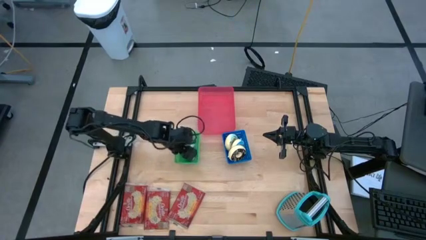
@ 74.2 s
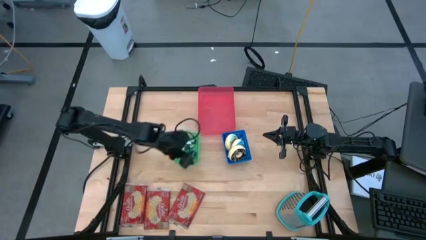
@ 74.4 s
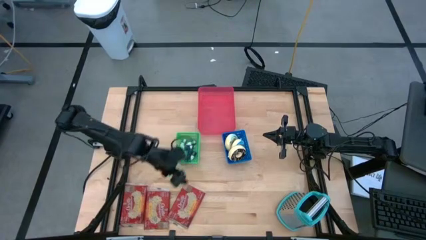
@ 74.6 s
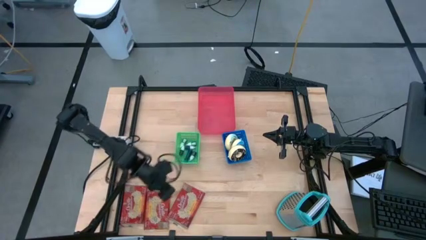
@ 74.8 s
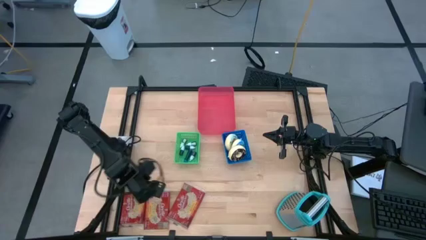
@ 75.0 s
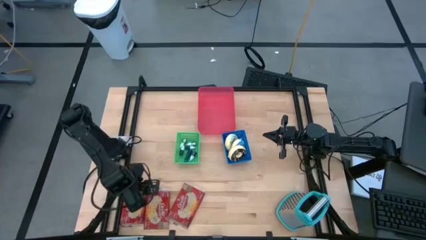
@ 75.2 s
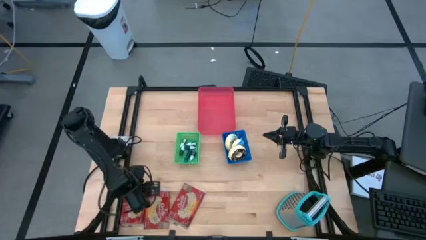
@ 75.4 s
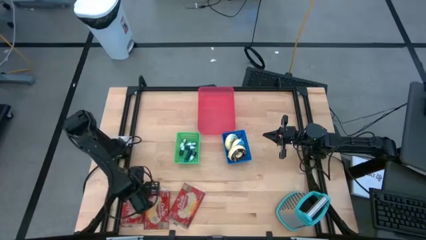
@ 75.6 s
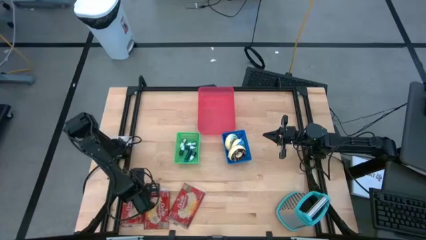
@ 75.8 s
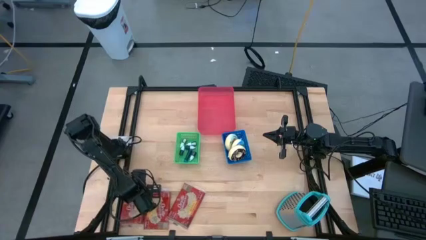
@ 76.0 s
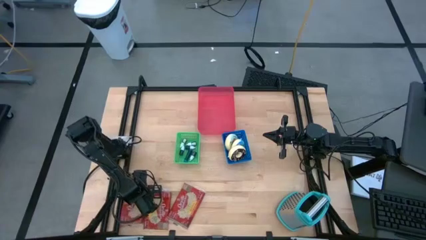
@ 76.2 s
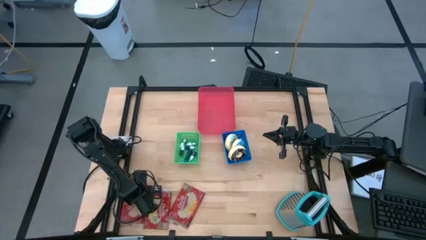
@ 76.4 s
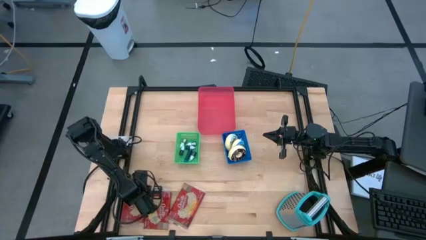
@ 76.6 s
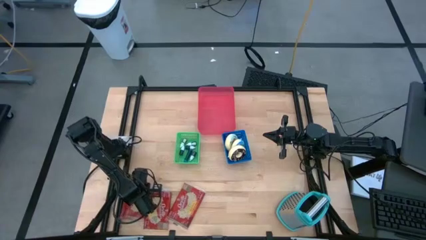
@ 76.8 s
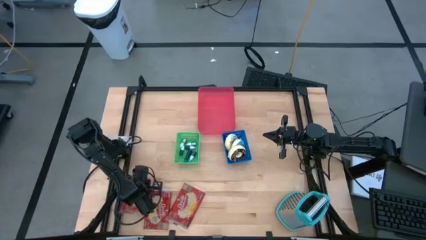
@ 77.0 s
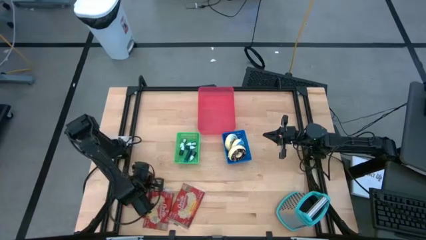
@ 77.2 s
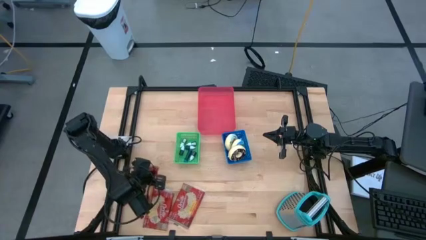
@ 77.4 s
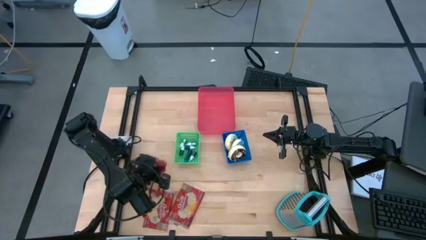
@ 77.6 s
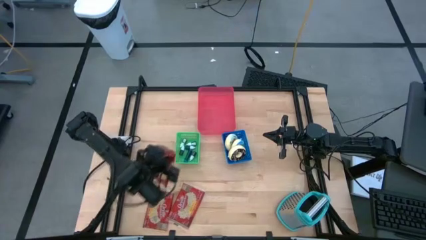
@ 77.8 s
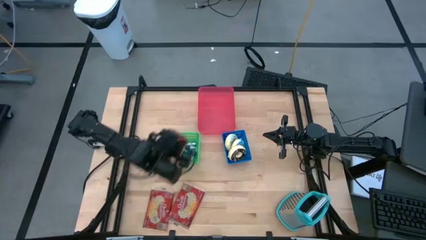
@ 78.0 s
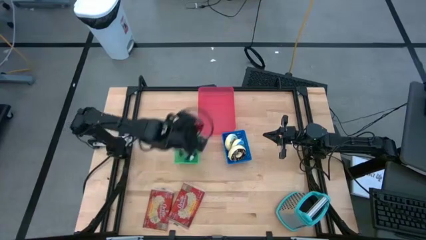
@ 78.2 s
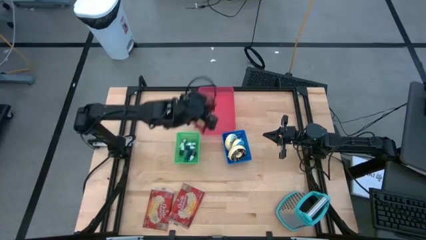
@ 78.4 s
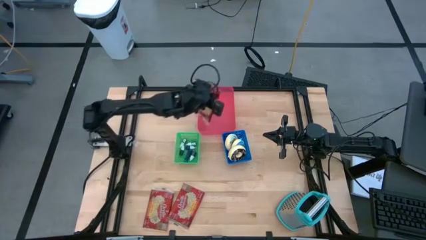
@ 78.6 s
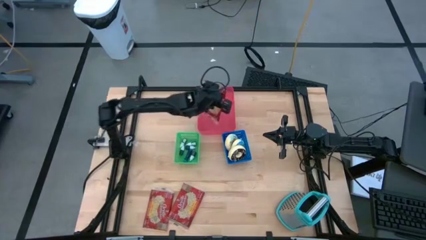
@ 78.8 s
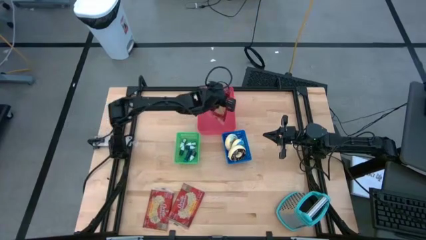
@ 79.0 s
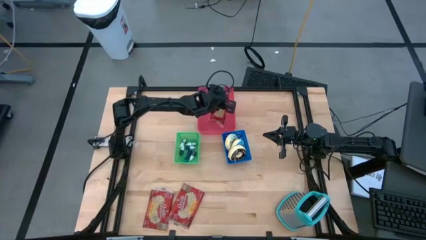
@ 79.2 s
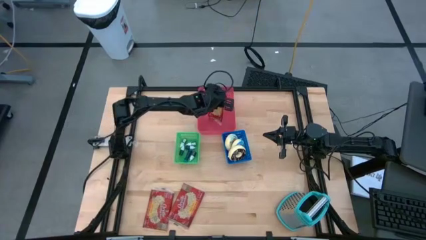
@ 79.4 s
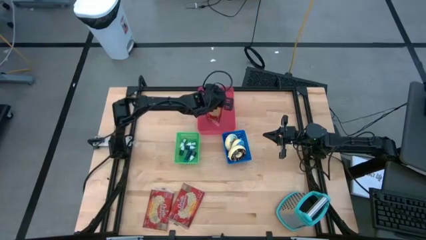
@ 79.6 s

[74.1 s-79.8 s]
Put the left red popcorn bag into the pink bin

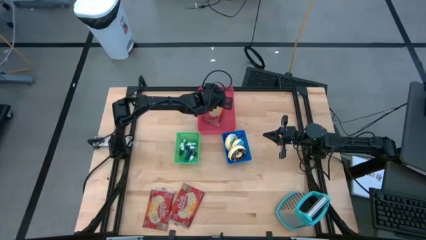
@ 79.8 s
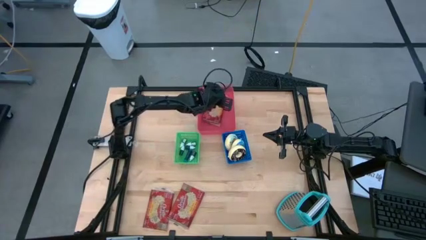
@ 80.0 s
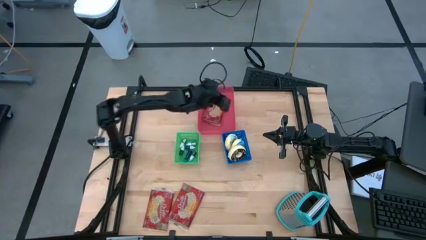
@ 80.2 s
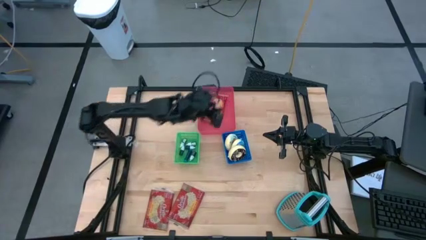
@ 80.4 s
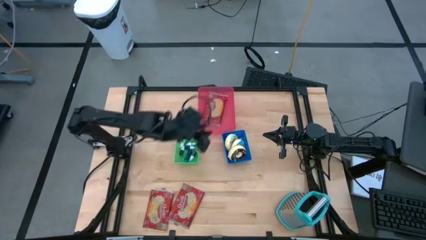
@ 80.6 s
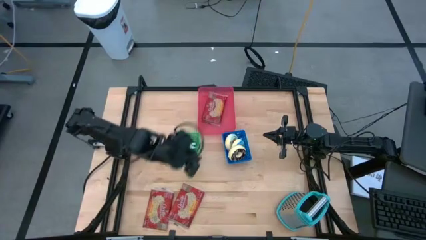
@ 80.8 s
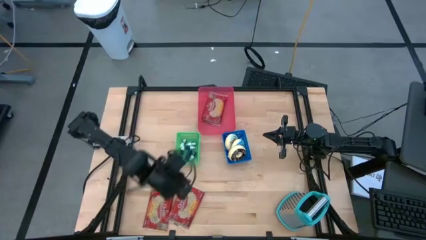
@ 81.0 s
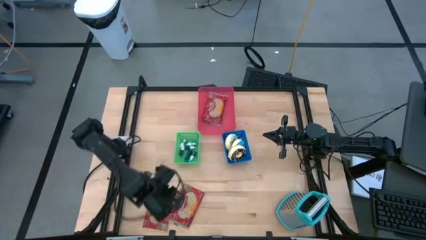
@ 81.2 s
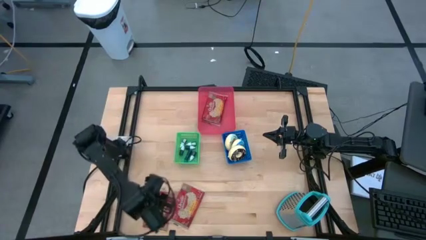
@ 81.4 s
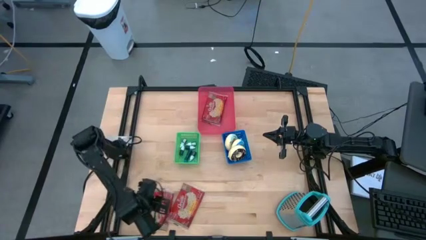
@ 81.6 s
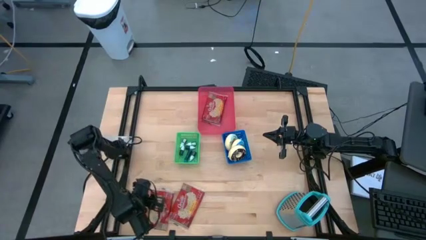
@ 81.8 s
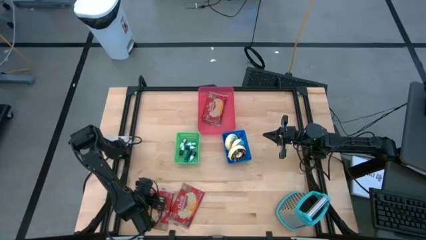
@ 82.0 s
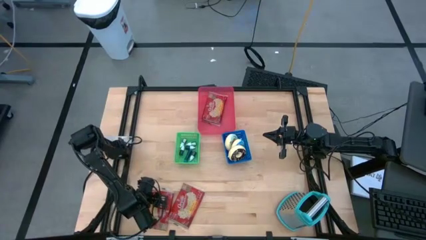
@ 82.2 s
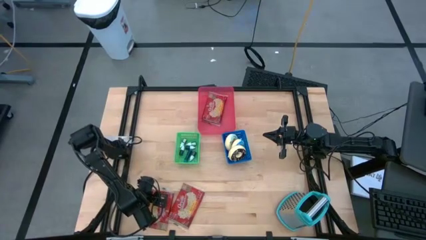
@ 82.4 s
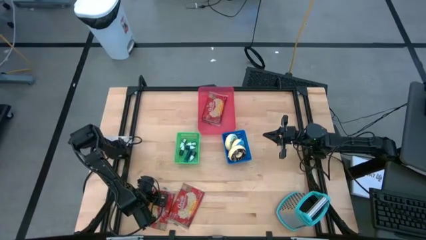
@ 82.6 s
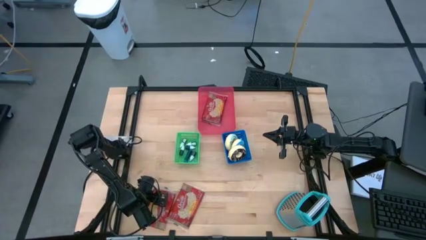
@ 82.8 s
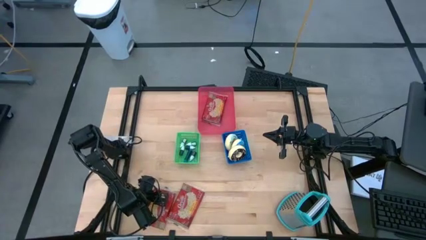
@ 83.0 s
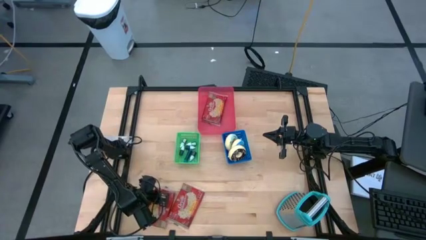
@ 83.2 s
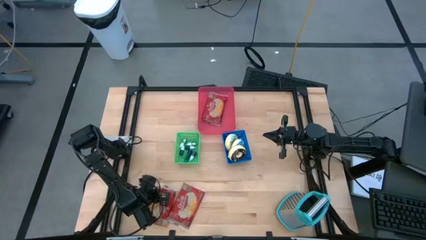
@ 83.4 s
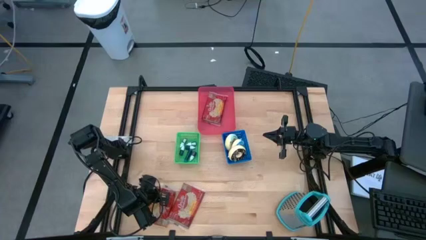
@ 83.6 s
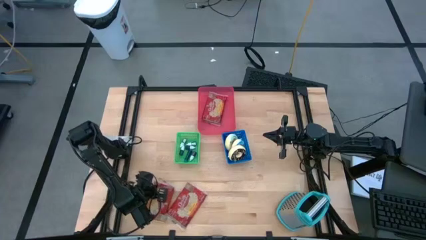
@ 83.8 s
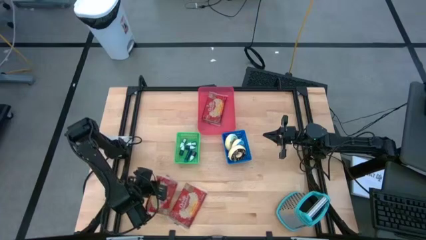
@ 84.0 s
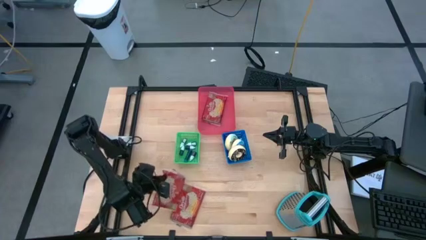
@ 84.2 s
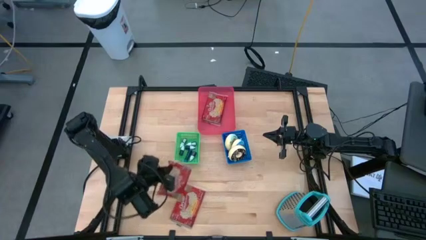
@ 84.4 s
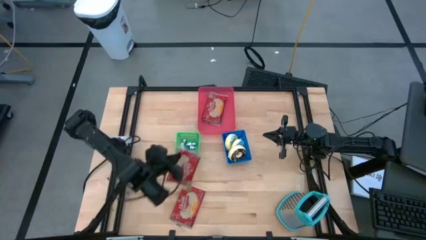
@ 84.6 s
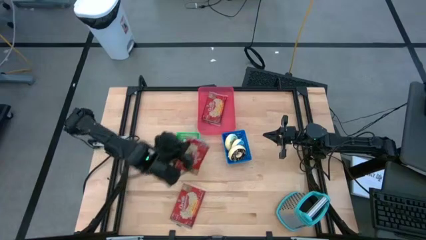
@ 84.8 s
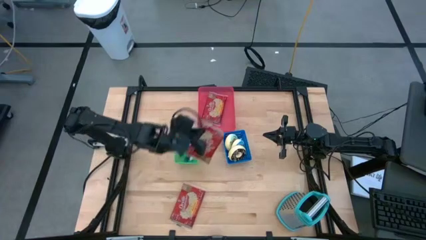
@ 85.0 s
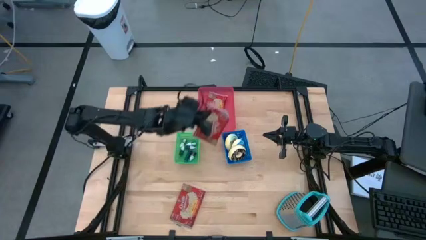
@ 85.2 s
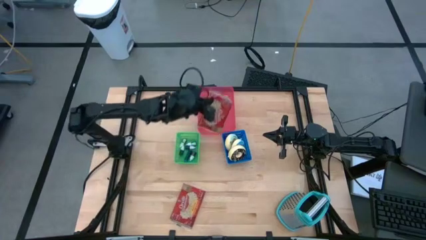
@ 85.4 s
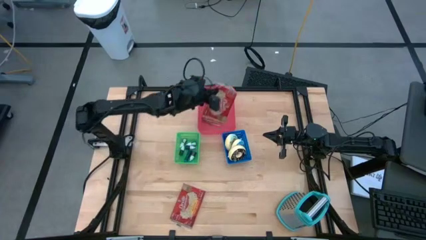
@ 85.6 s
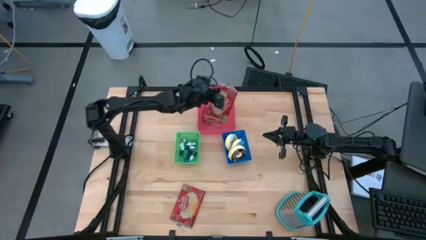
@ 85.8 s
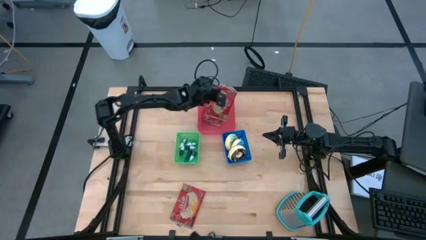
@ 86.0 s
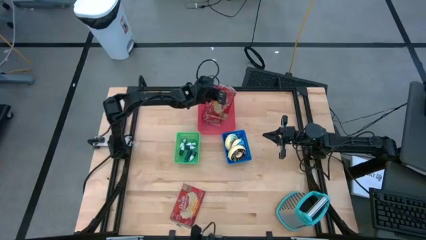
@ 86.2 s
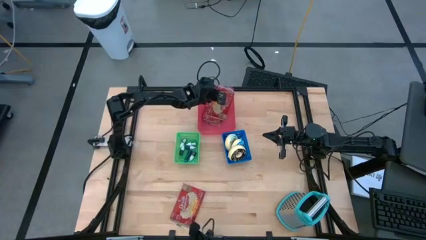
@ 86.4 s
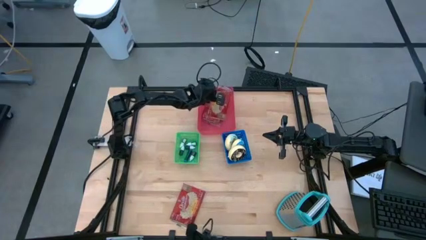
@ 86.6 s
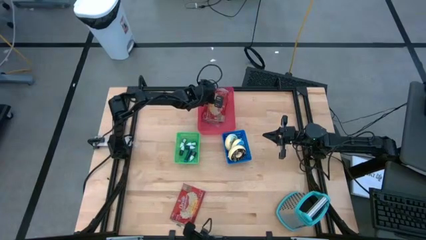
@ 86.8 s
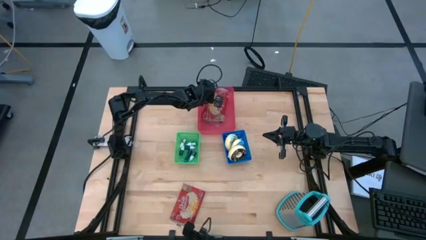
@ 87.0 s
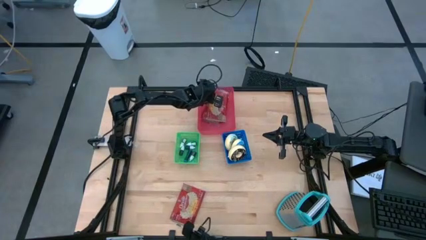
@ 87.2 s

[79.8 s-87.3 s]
Put the left red popcorn bag into the pink bin
